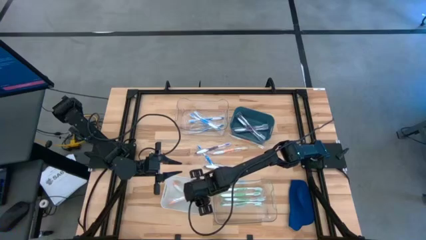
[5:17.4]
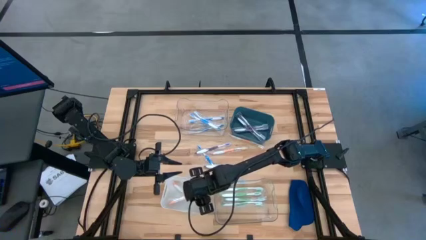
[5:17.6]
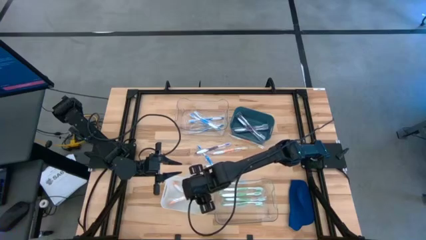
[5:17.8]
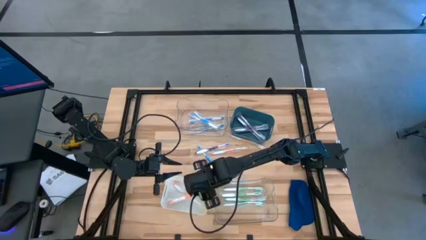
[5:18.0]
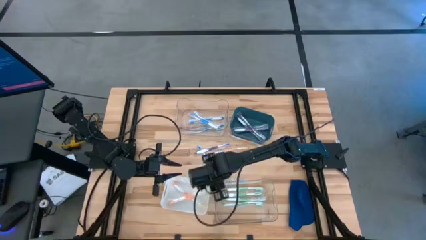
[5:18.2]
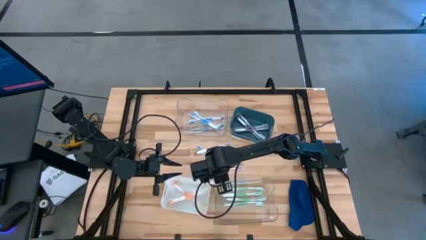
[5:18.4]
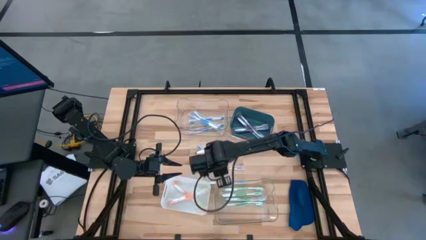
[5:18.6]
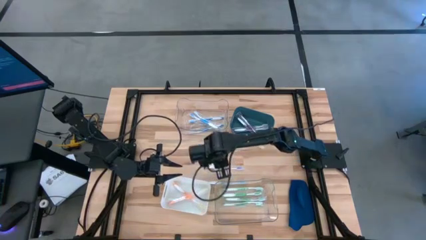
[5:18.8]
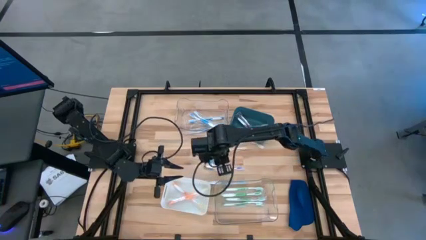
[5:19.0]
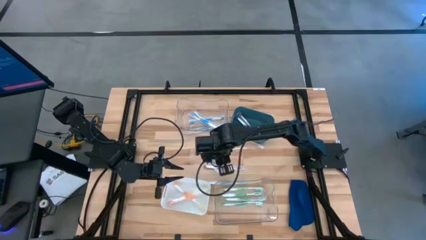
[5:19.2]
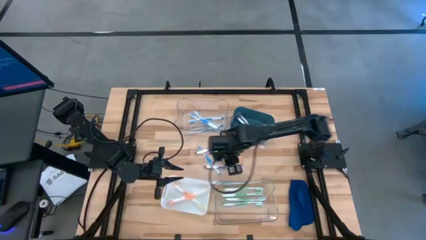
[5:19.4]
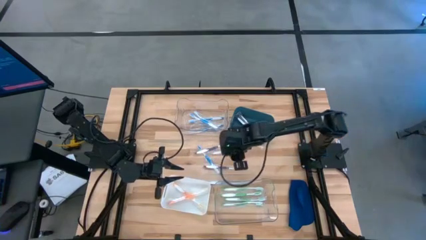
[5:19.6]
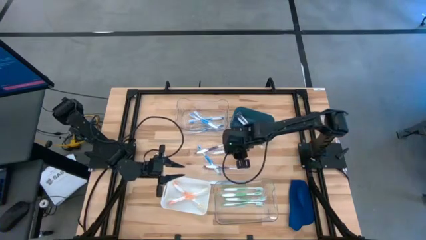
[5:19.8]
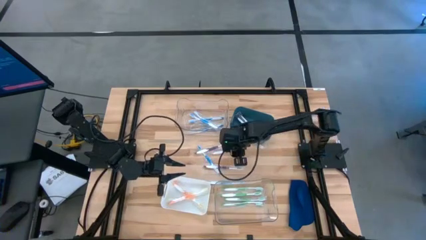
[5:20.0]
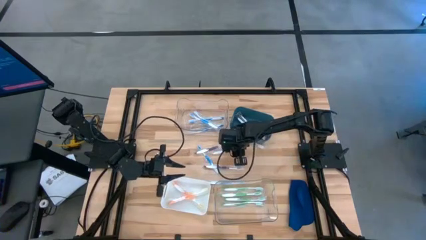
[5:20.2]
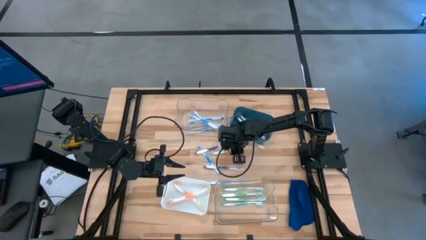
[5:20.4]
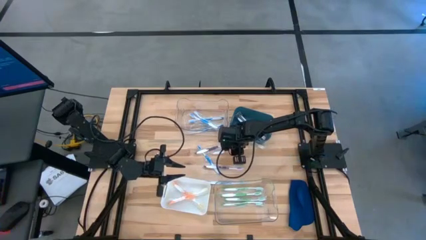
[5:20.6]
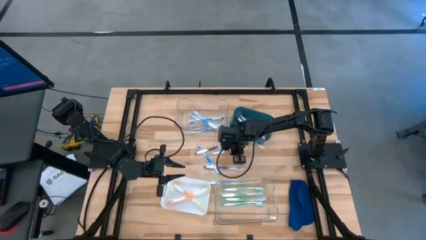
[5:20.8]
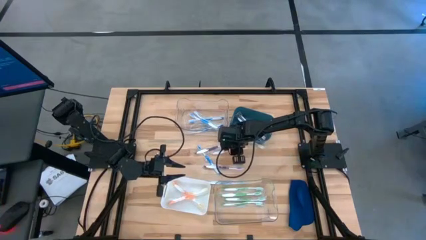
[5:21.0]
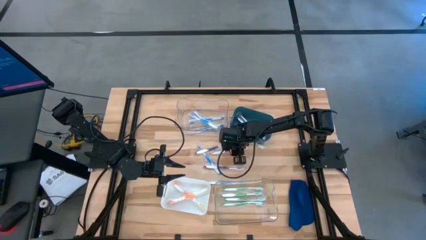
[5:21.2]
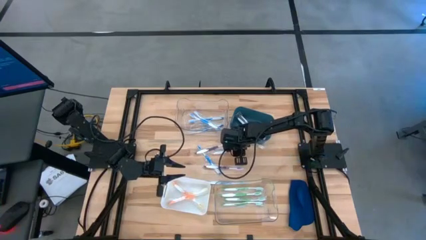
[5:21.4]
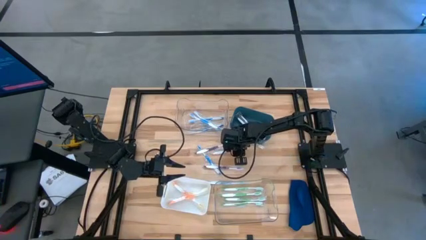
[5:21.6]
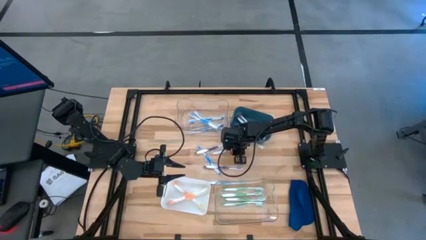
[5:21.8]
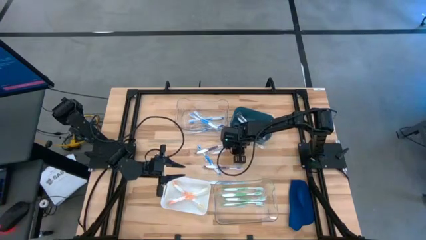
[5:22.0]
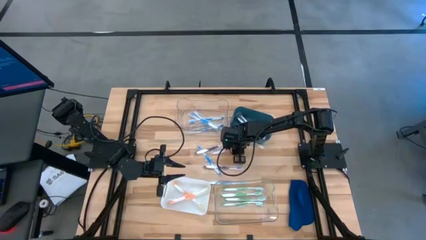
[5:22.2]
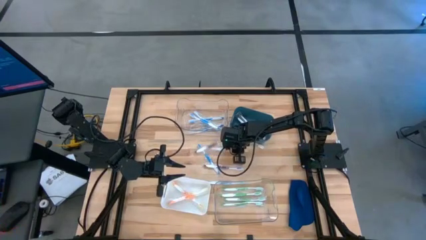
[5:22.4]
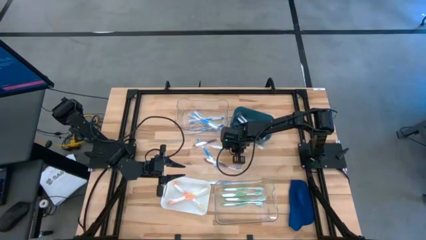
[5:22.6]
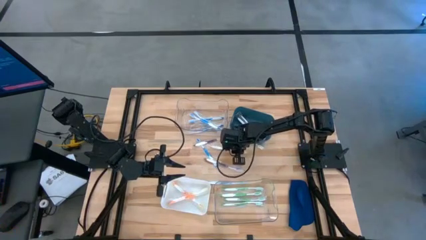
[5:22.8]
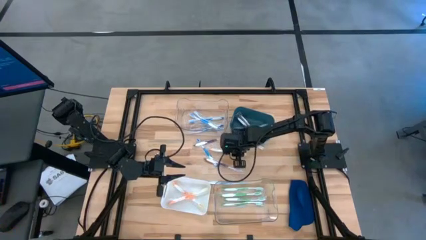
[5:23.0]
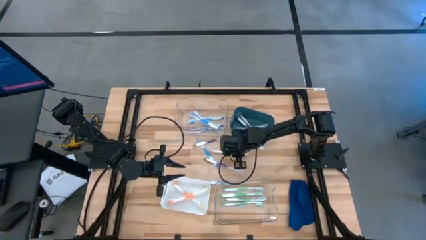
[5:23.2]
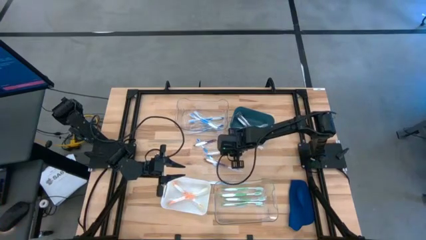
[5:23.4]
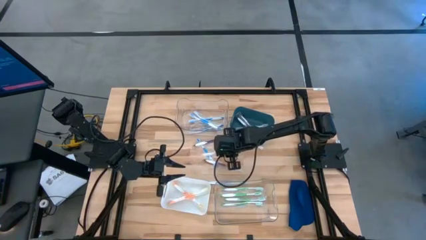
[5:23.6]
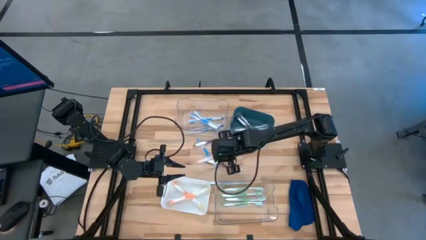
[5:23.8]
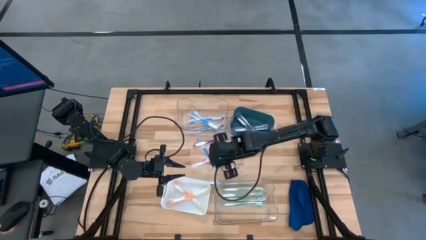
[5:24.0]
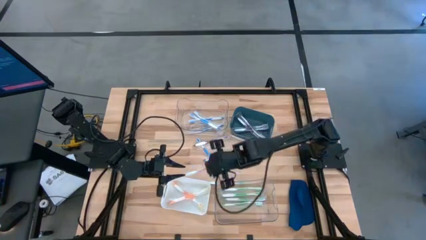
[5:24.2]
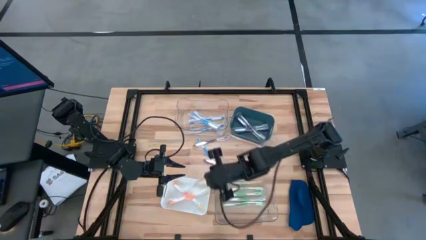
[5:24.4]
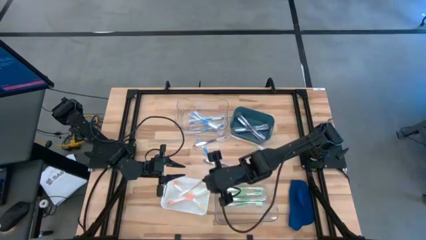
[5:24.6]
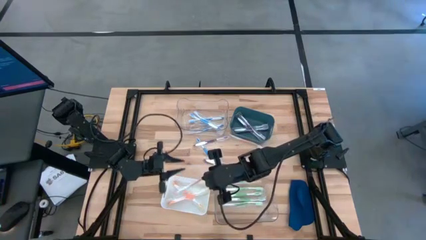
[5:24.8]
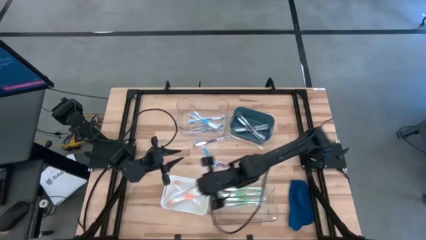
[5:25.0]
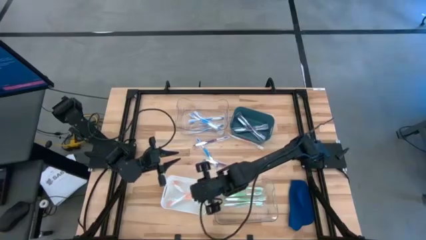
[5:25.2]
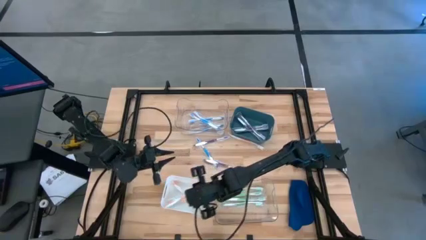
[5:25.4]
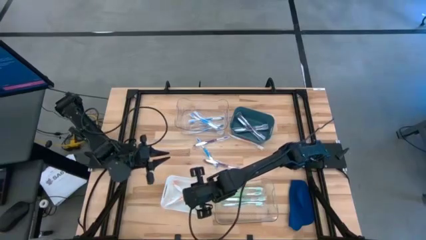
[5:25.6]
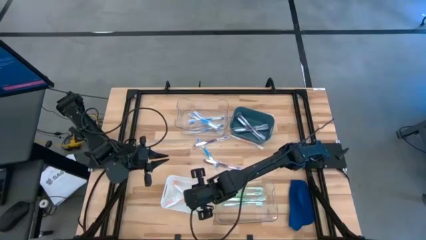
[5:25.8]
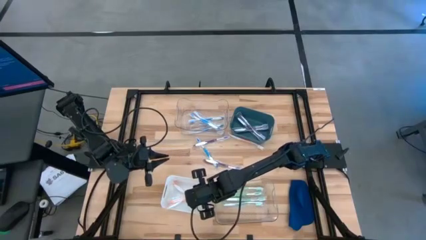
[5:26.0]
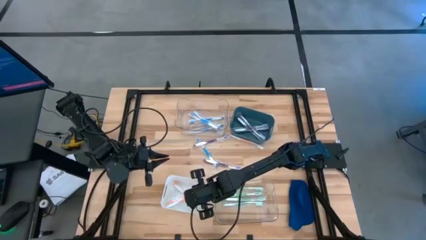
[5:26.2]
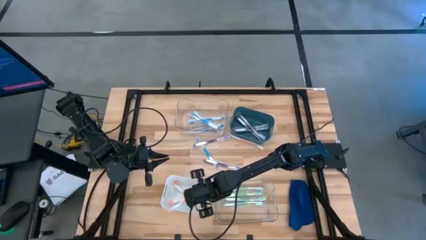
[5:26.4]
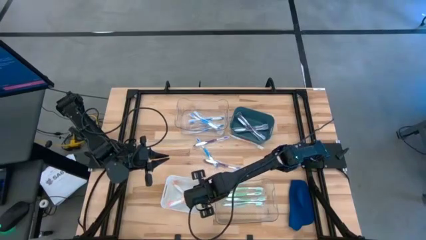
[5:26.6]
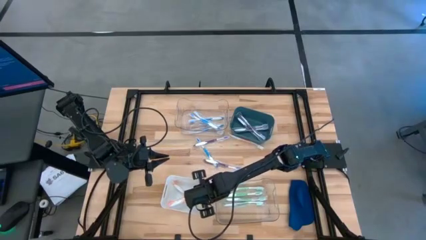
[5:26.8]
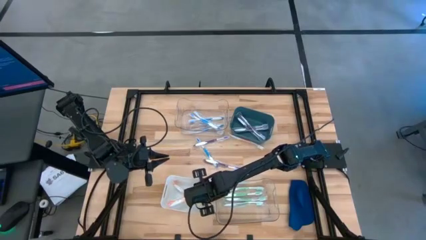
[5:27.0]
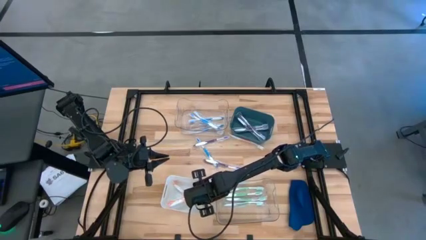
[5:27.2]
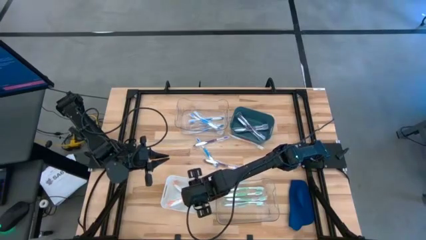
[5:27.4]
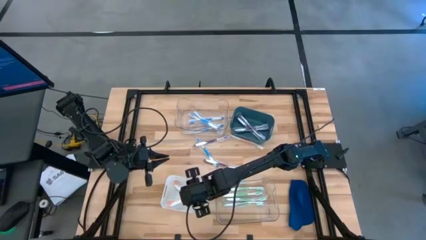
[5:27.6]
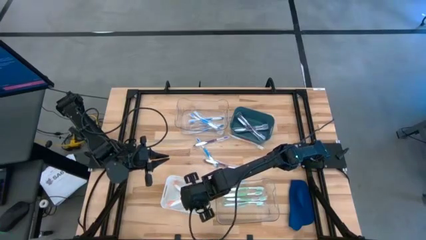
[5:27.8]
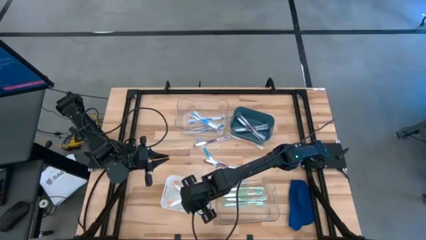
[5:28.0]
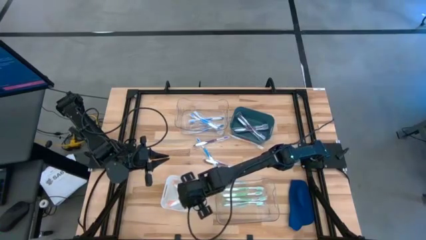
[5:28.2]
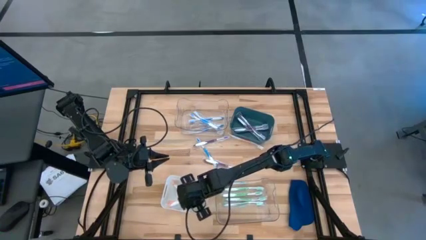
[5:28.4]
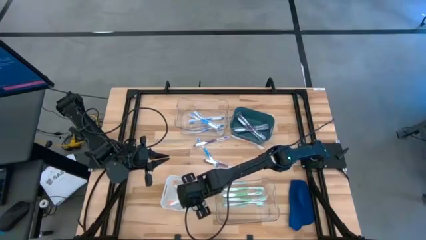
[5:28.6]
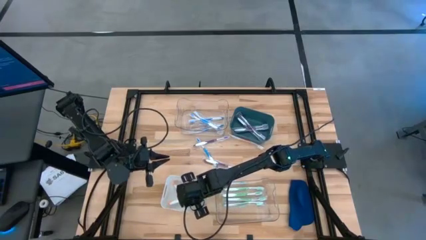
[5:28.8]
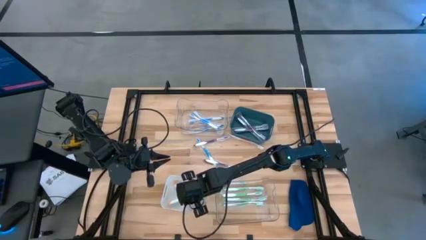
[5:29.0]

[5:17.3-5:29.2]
Task: Pick & Place Toothbrushes
Put the orange toothbrush into the white bin
